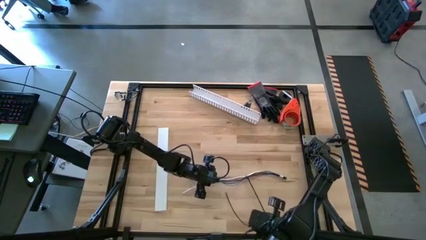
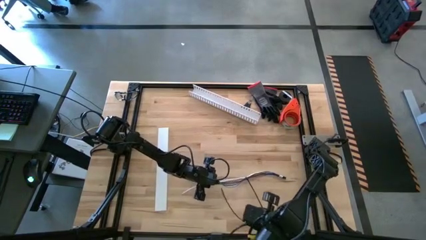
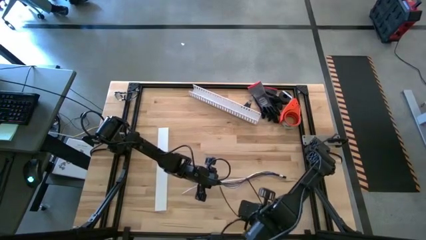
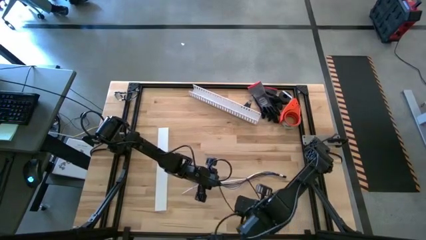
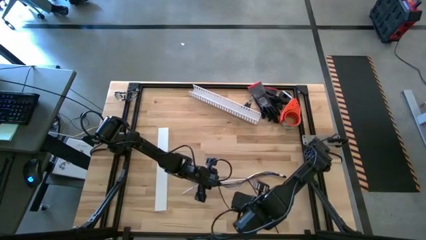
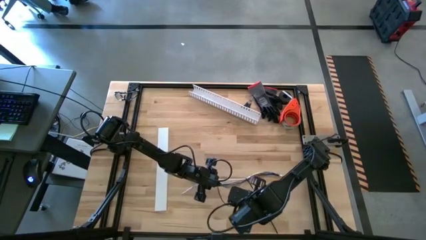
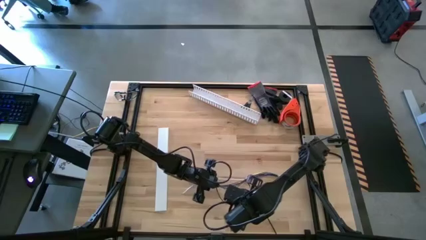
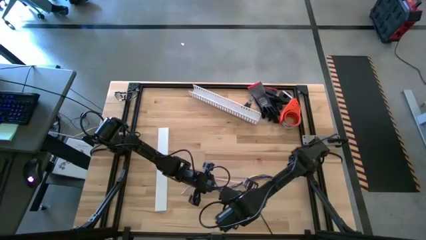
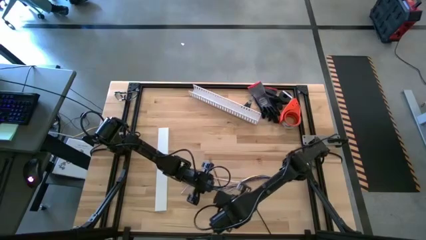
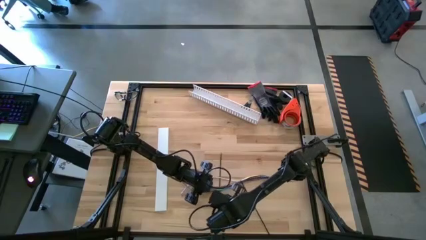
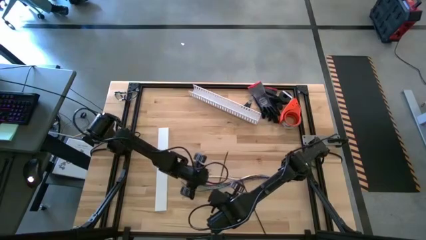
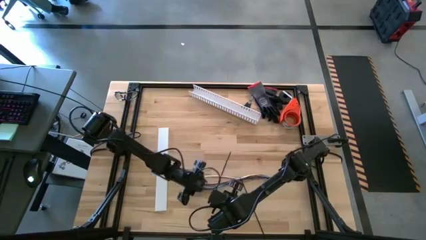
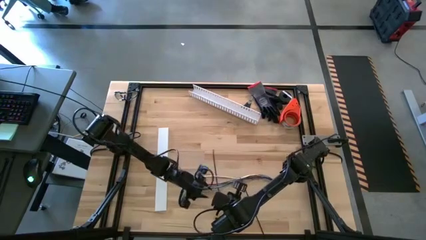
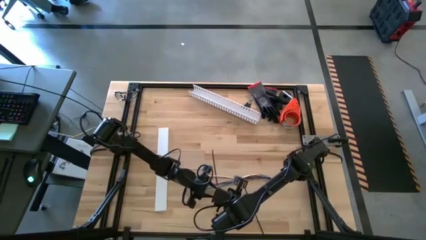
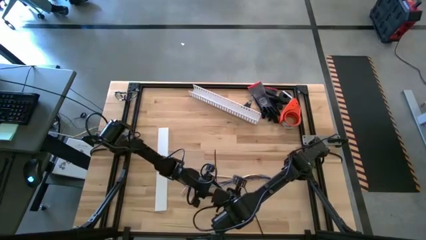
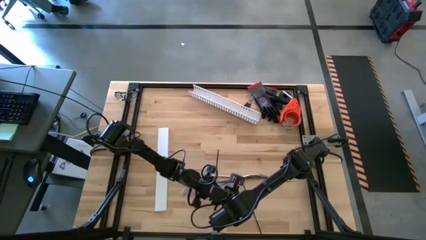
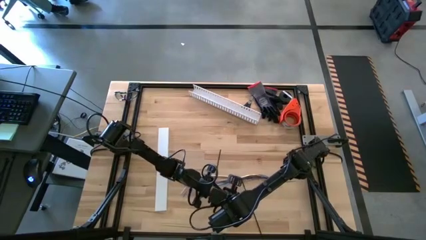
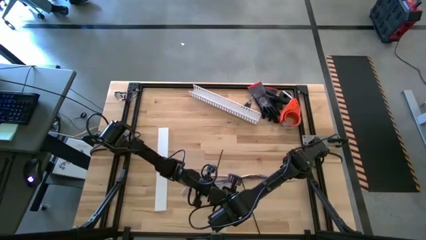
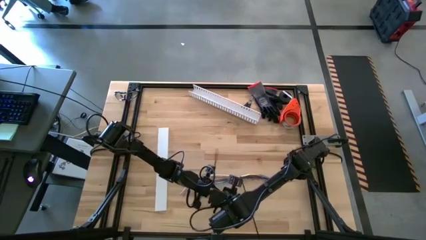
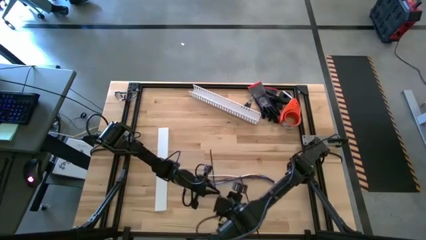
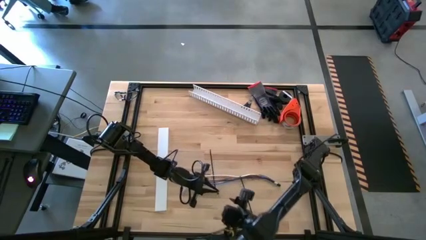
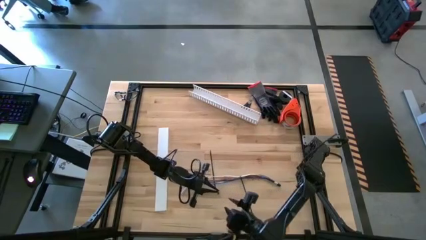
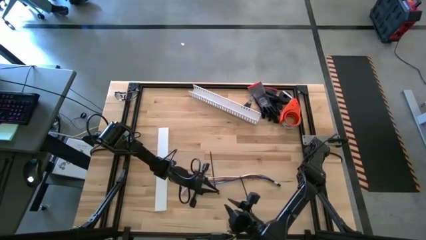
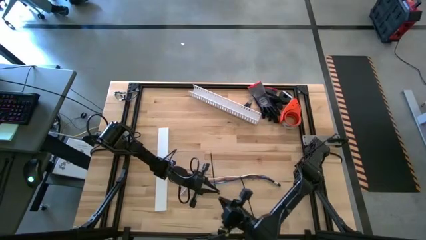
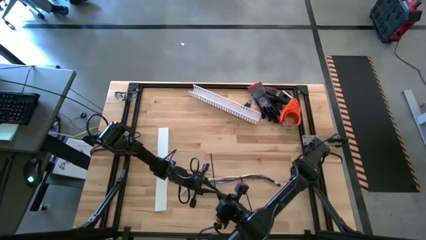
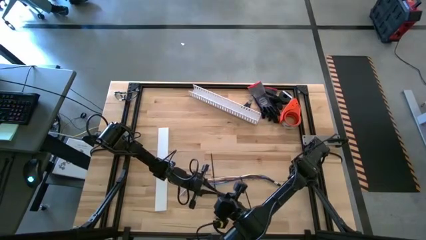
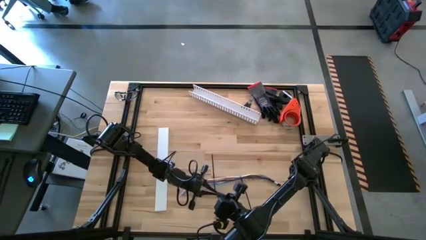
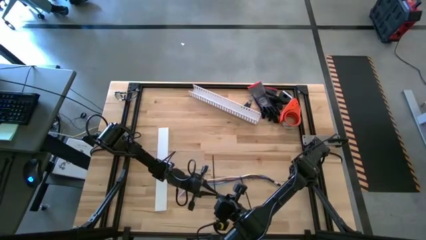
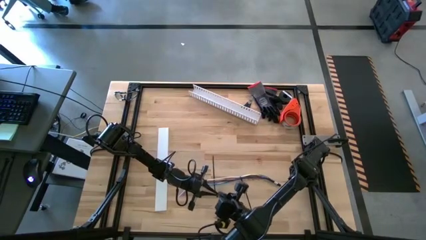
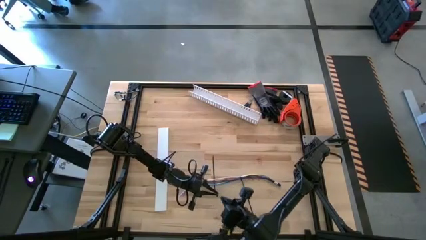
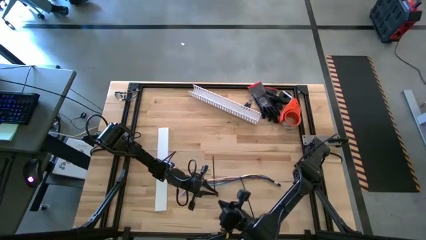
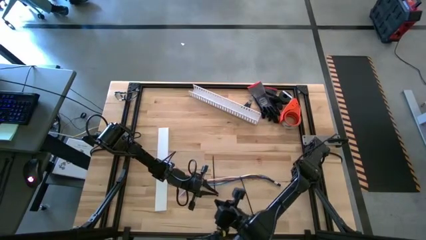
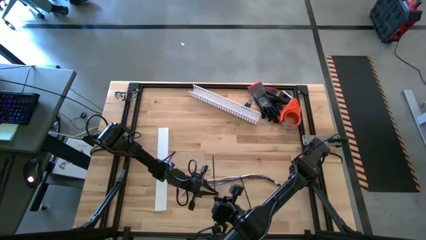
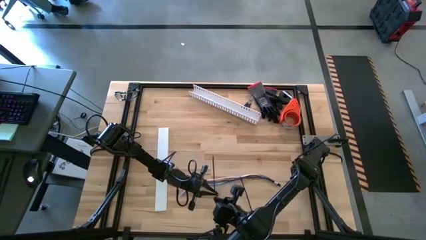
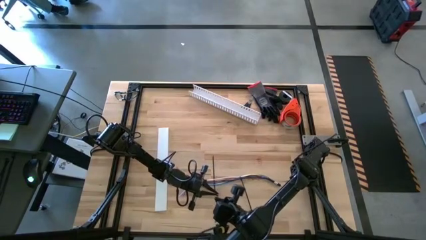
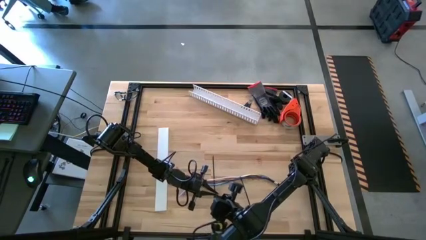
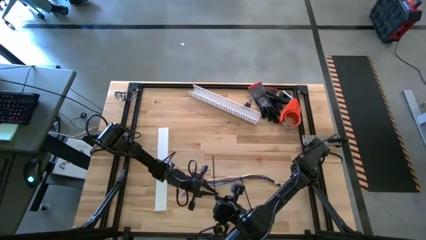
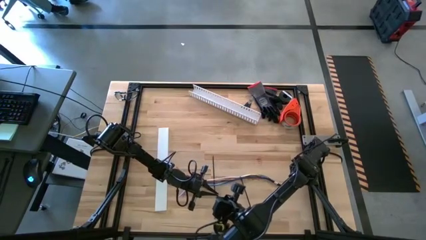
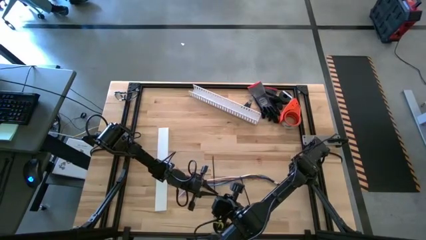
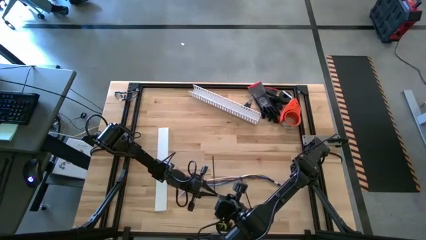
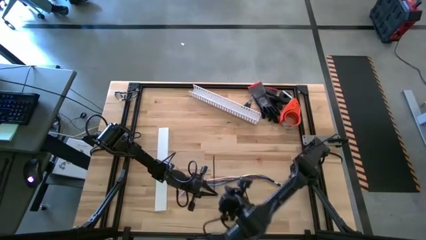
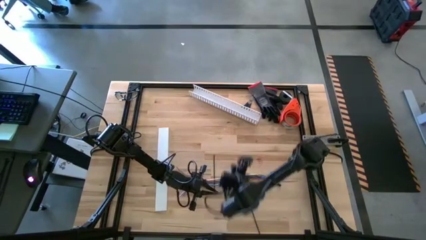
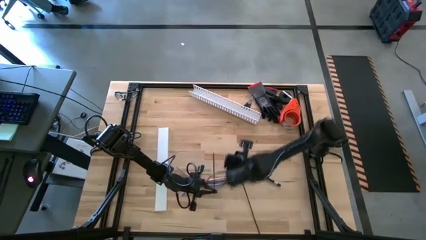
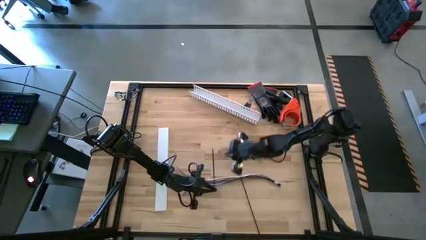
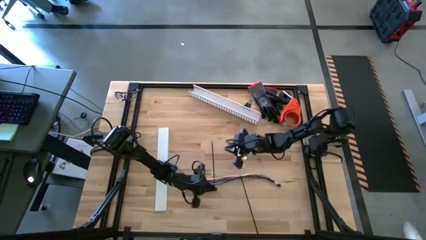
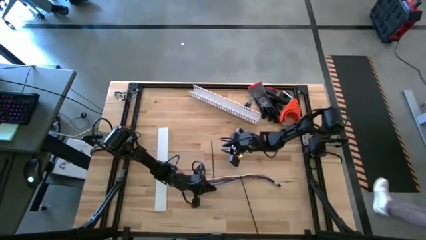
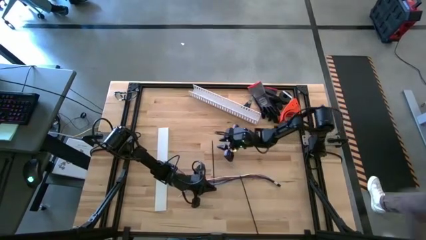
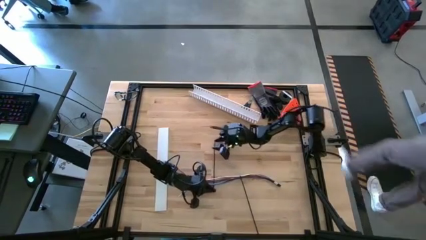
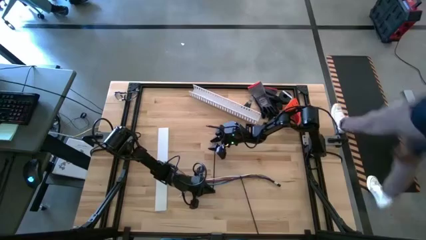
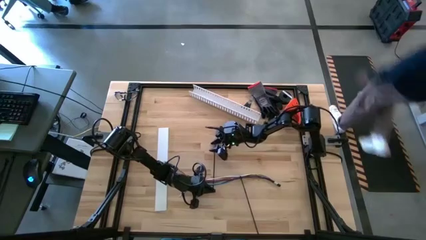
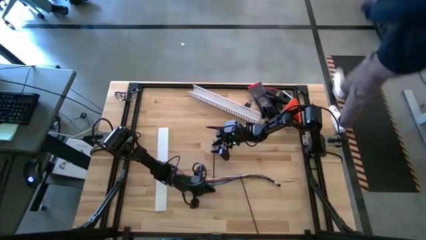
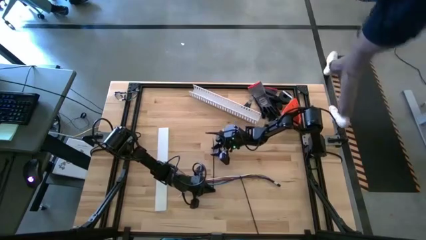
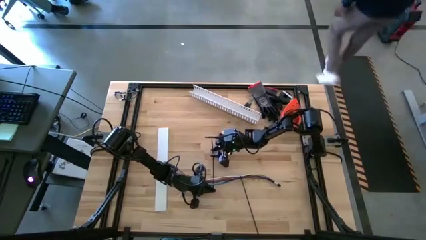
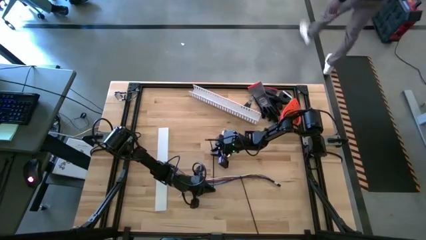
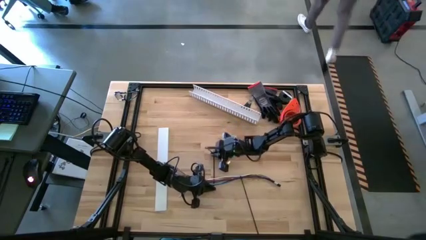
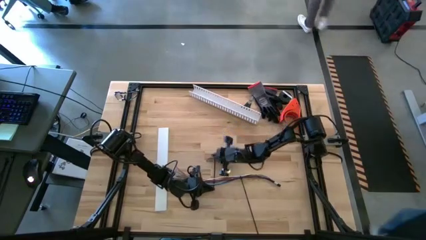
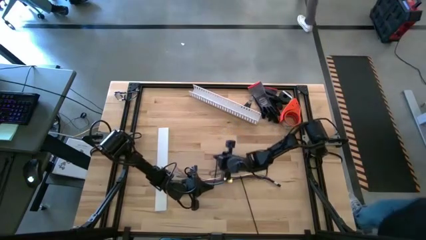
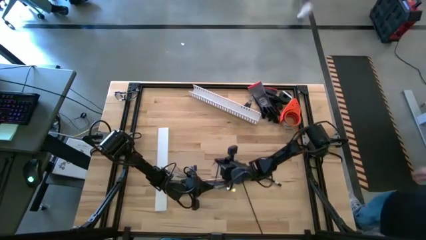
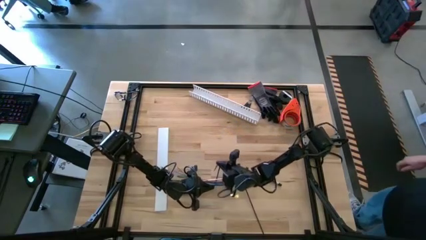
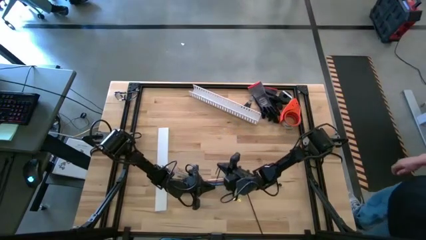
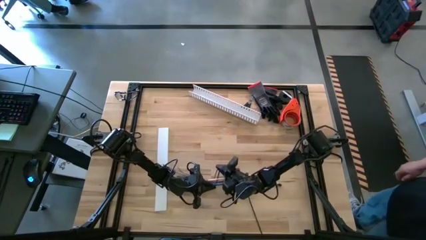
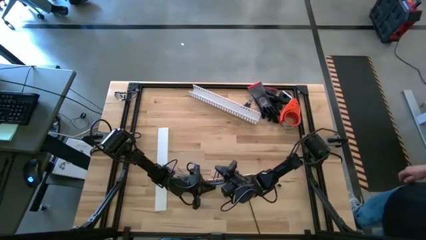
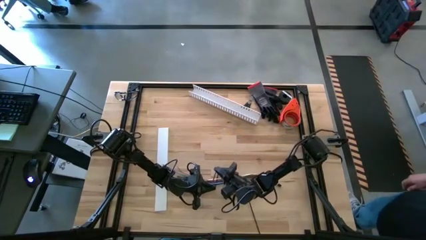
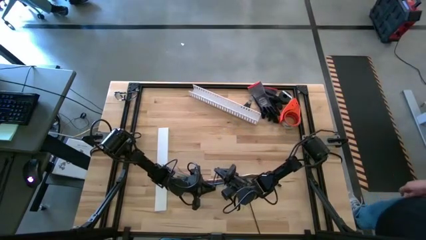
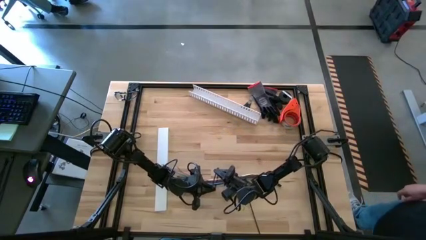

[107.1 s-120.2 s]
Task: Ziptie cables
Wrap the zip tie on the cable

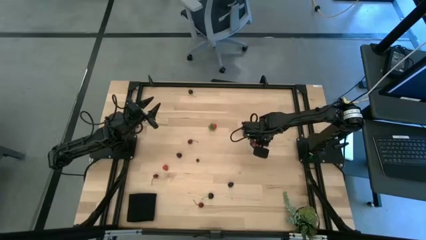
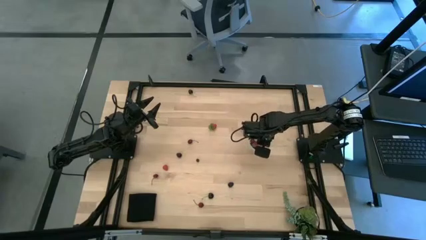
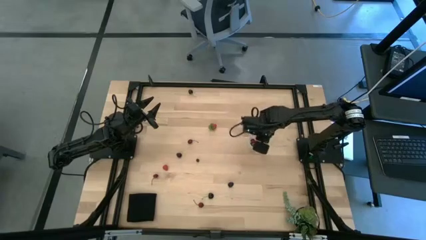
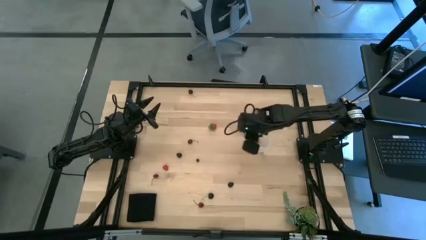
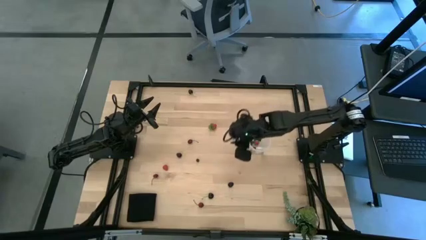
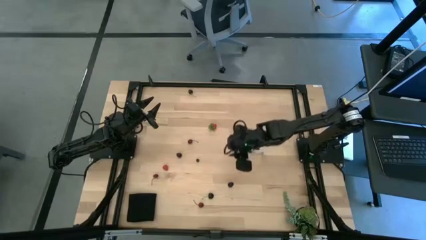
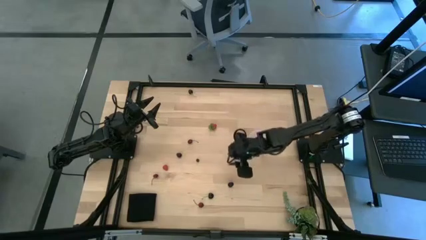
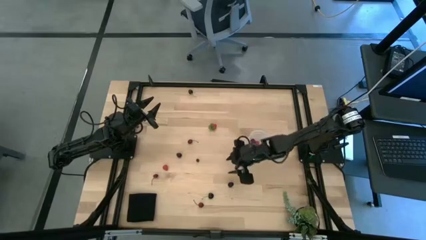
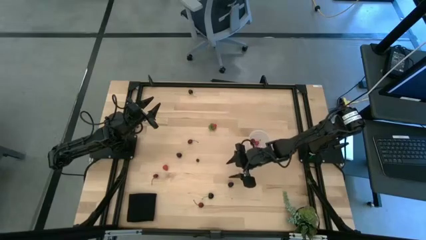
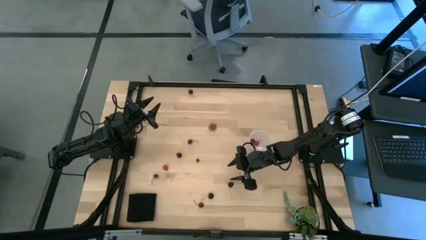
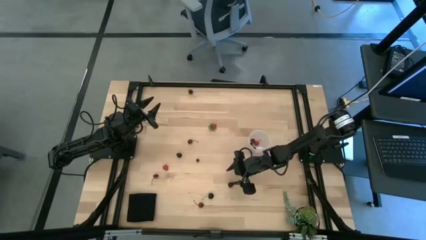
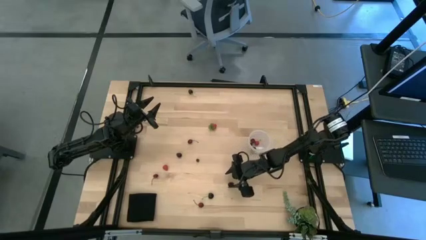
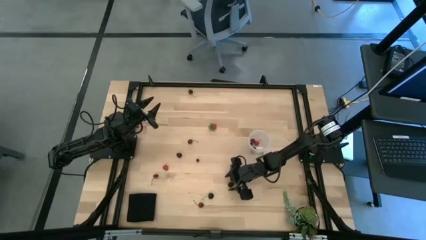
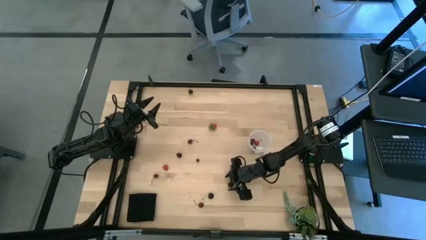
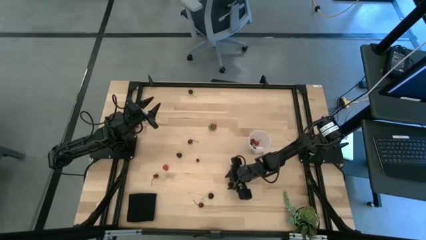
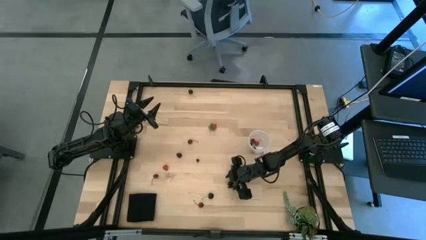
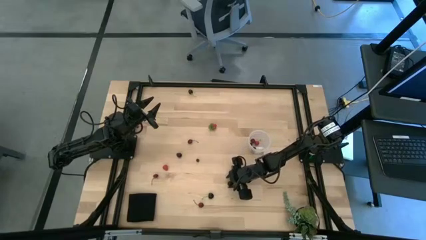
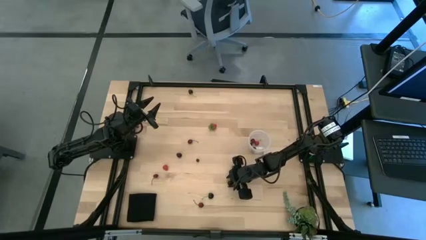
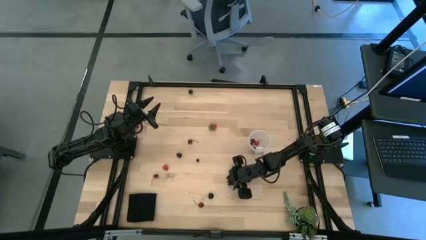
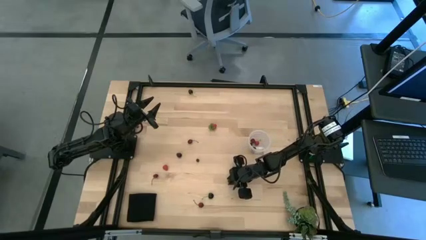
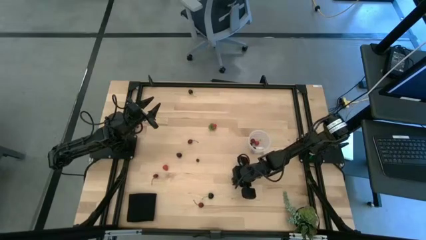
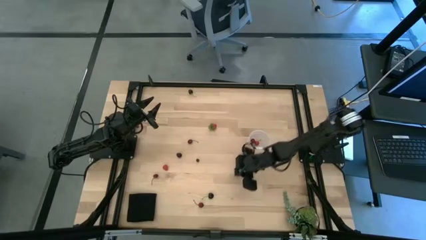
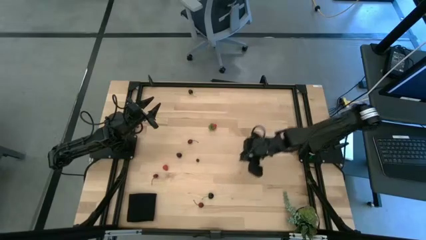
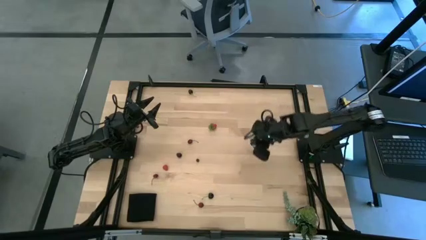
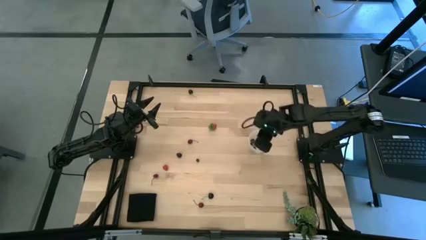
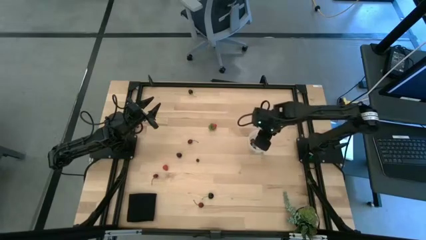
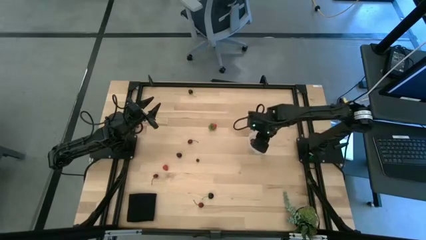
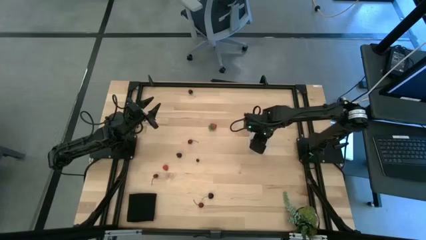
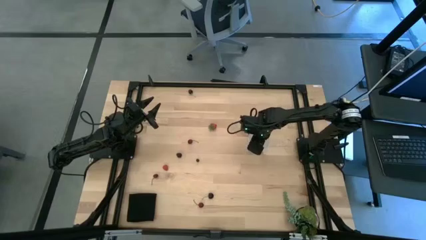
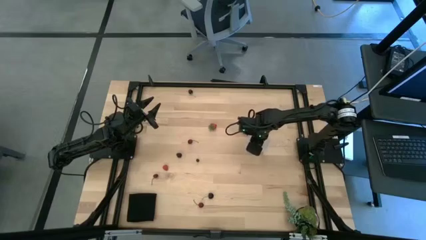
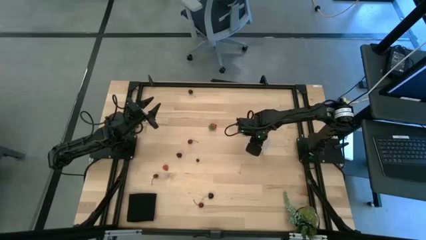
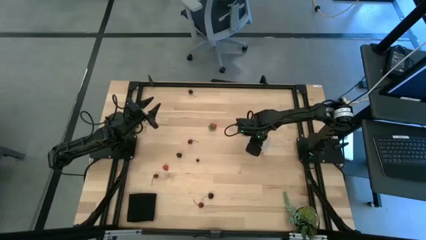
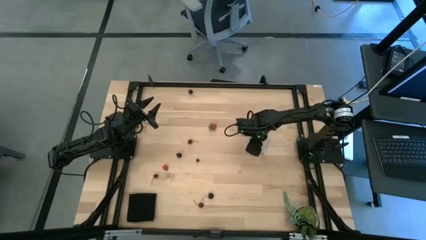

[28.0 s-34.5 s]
Task: Pick and placing Produce into tupperware
Put the blackberry into the transparent bucket
